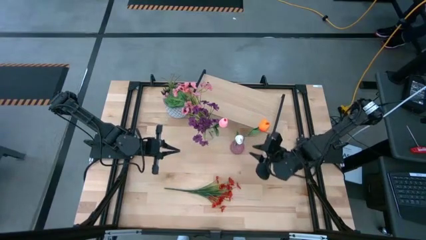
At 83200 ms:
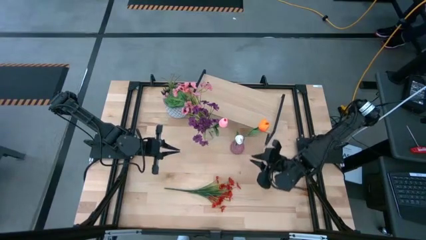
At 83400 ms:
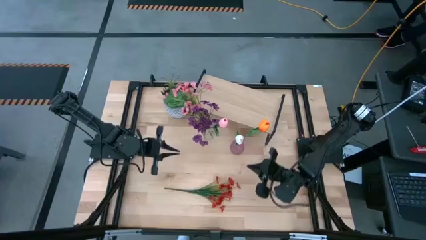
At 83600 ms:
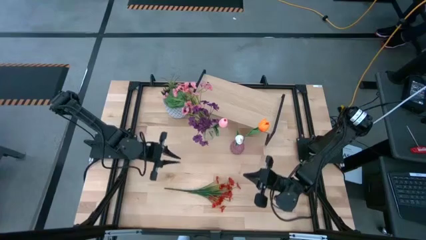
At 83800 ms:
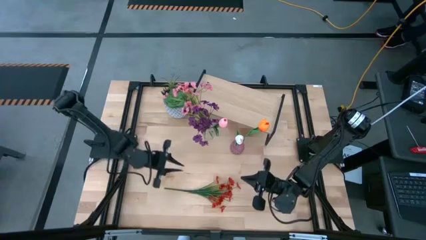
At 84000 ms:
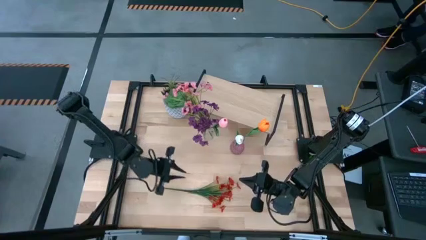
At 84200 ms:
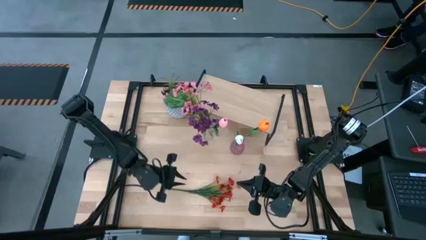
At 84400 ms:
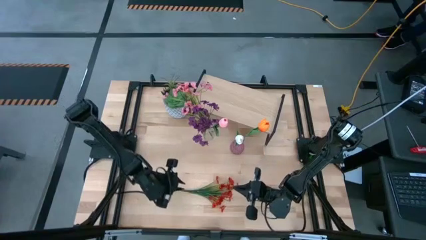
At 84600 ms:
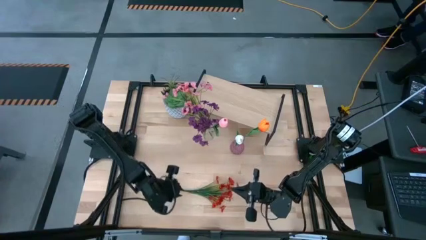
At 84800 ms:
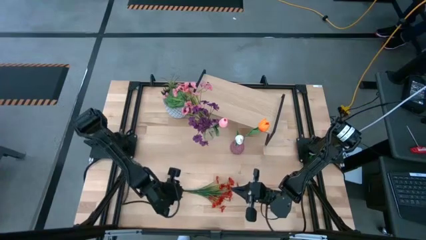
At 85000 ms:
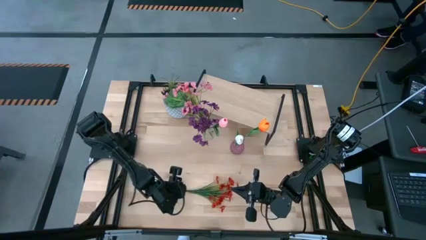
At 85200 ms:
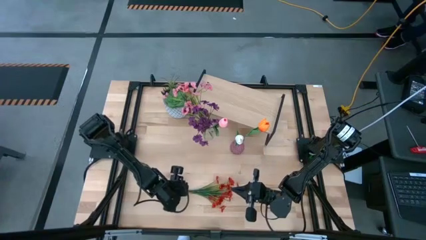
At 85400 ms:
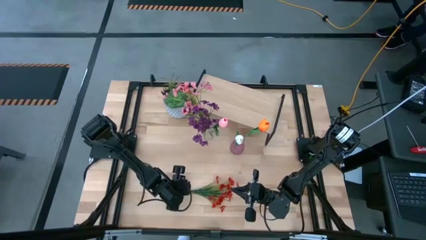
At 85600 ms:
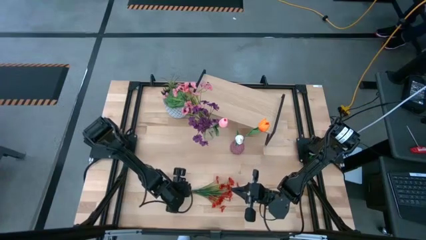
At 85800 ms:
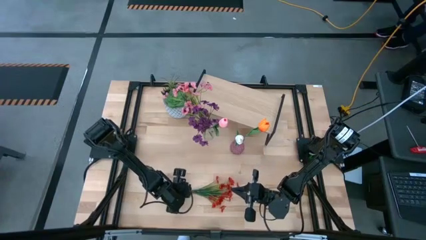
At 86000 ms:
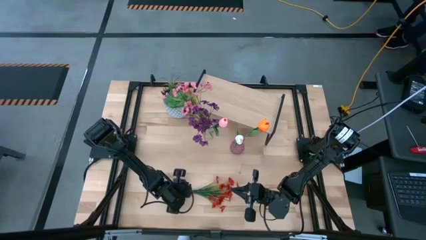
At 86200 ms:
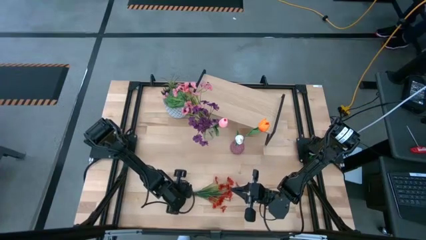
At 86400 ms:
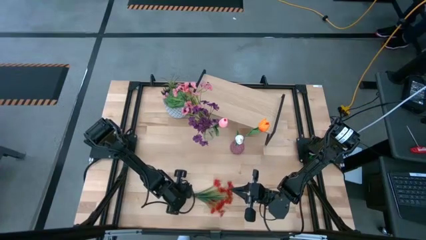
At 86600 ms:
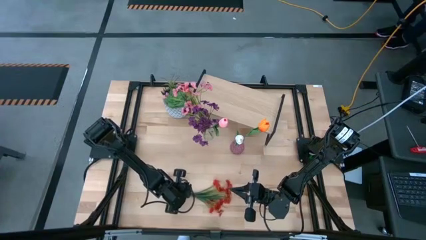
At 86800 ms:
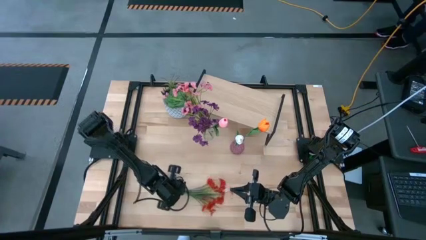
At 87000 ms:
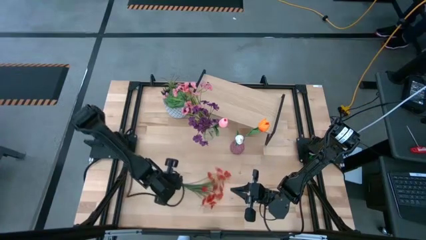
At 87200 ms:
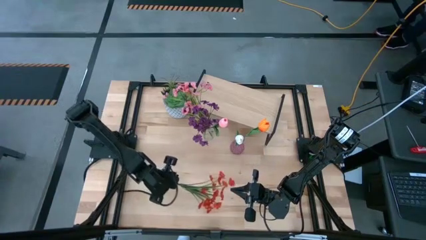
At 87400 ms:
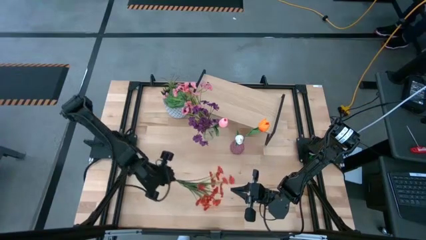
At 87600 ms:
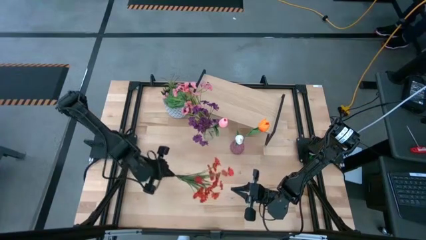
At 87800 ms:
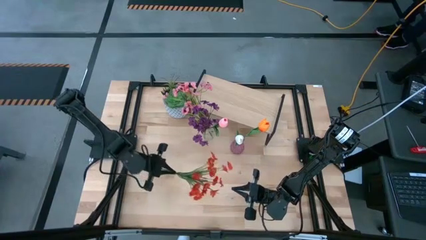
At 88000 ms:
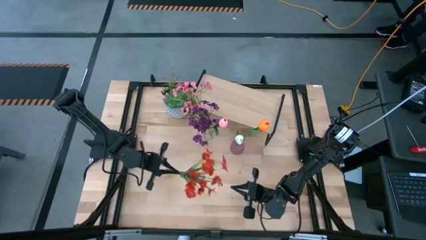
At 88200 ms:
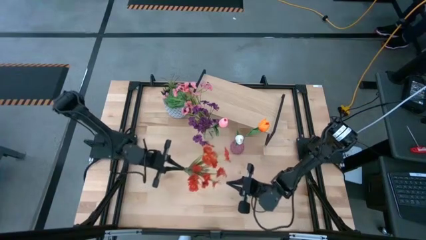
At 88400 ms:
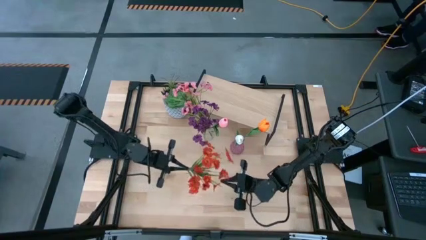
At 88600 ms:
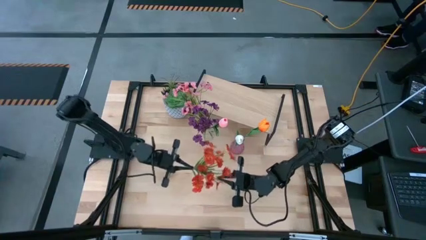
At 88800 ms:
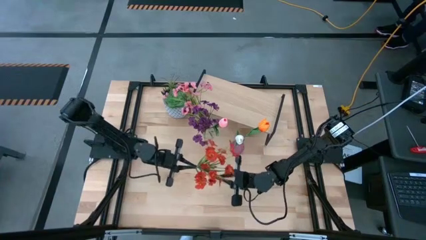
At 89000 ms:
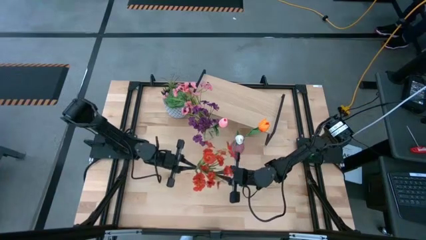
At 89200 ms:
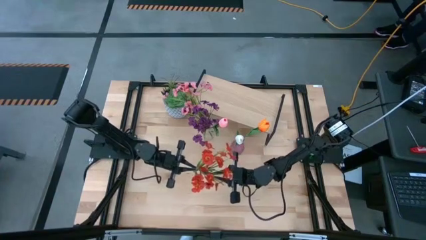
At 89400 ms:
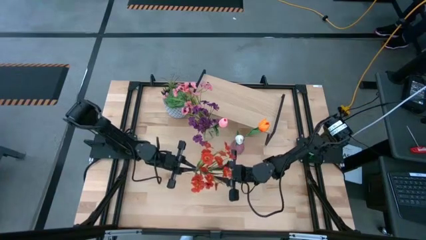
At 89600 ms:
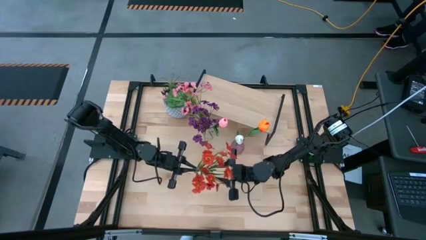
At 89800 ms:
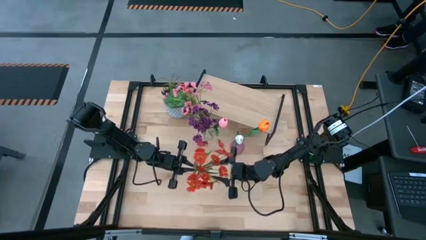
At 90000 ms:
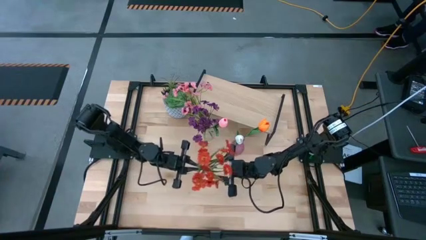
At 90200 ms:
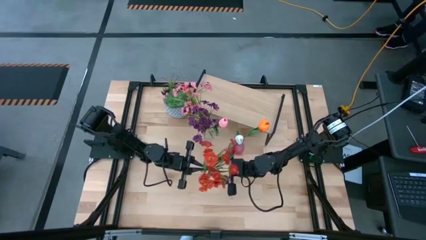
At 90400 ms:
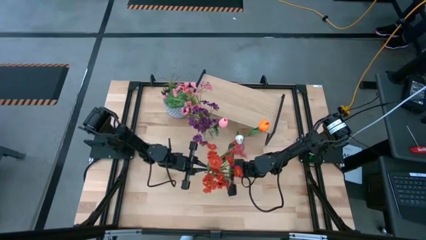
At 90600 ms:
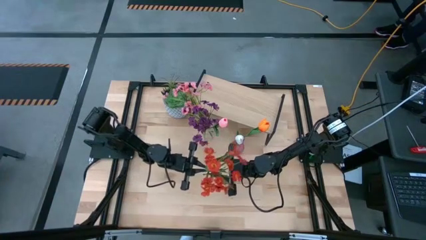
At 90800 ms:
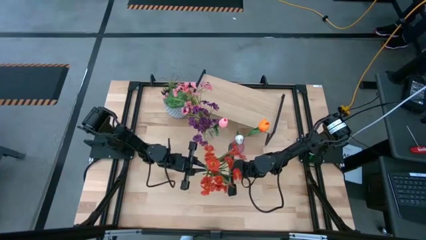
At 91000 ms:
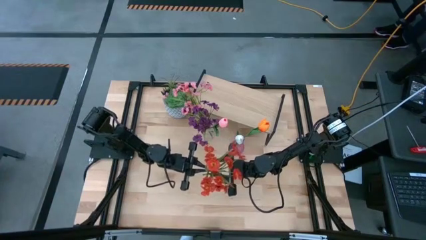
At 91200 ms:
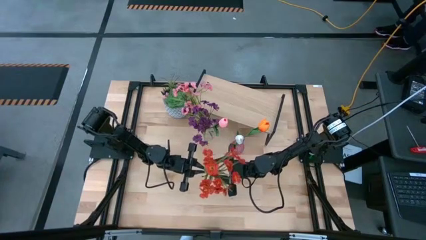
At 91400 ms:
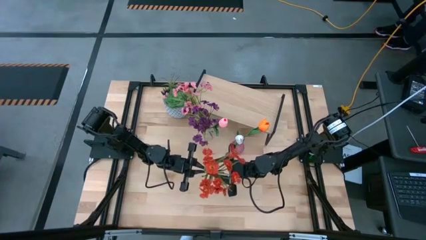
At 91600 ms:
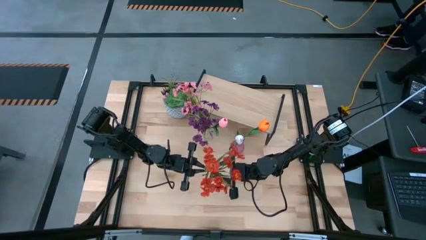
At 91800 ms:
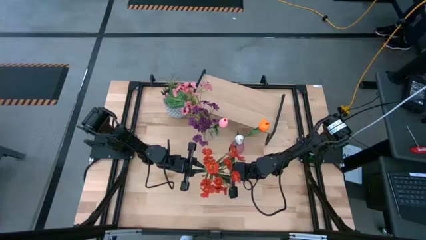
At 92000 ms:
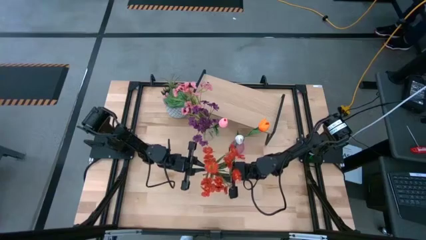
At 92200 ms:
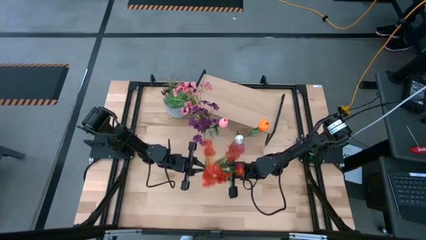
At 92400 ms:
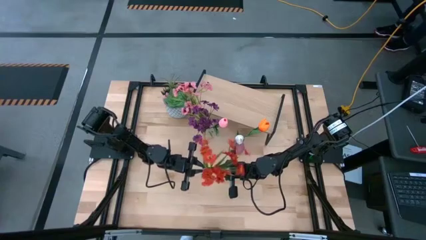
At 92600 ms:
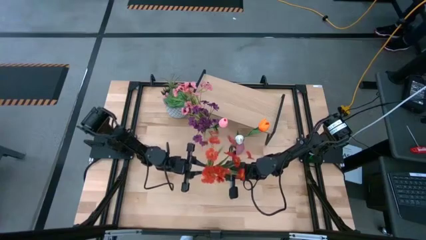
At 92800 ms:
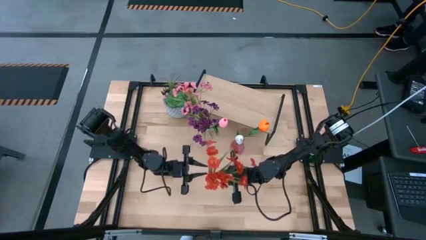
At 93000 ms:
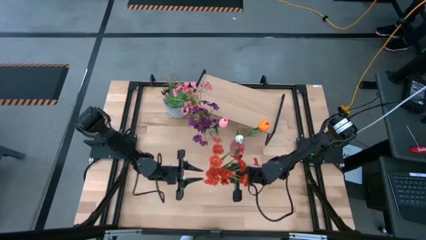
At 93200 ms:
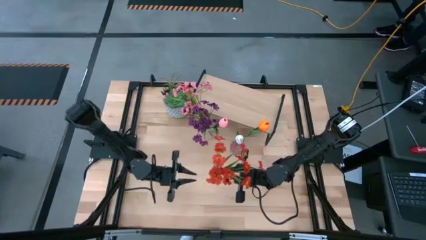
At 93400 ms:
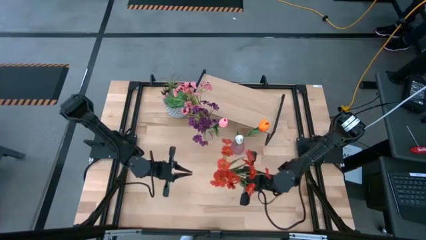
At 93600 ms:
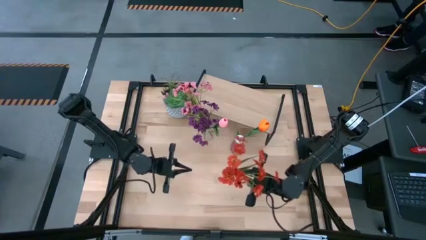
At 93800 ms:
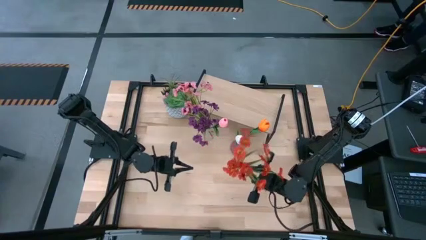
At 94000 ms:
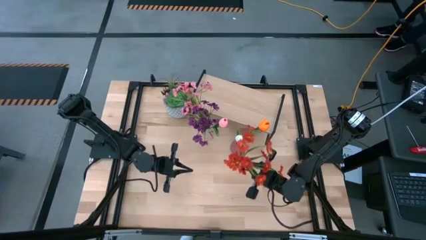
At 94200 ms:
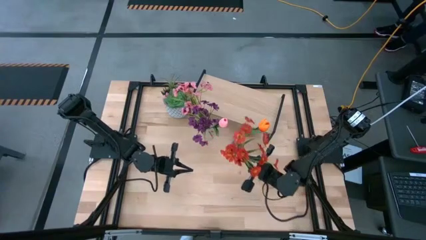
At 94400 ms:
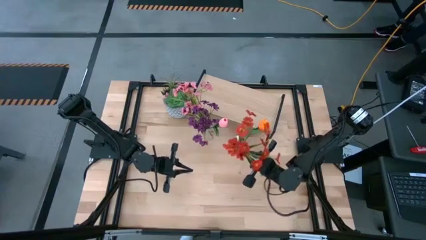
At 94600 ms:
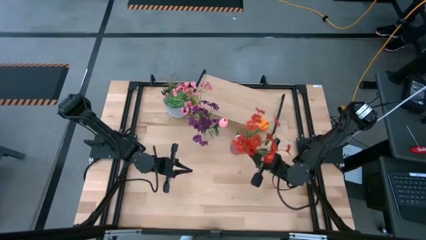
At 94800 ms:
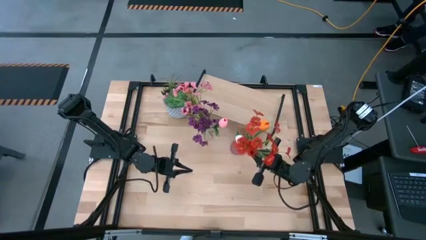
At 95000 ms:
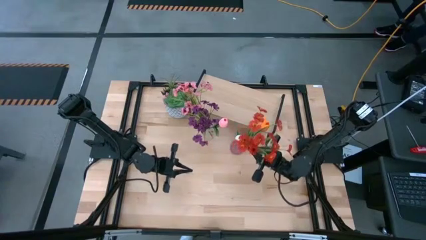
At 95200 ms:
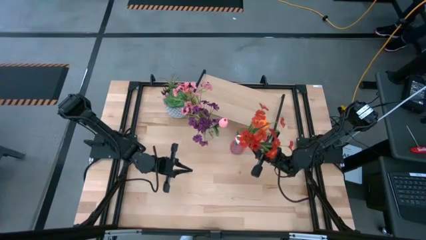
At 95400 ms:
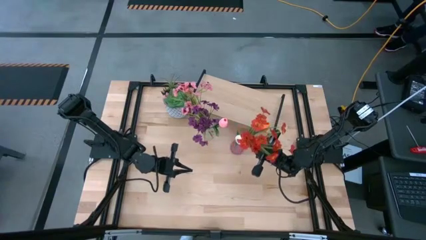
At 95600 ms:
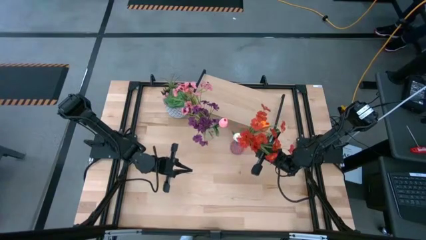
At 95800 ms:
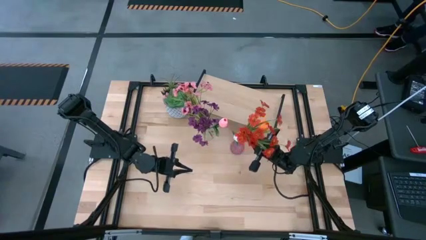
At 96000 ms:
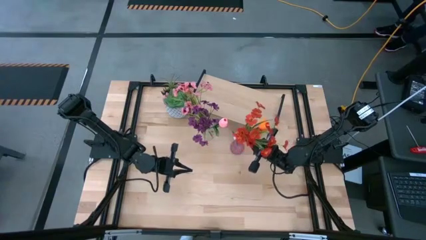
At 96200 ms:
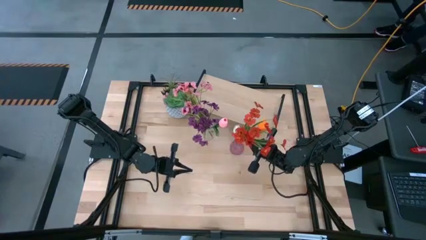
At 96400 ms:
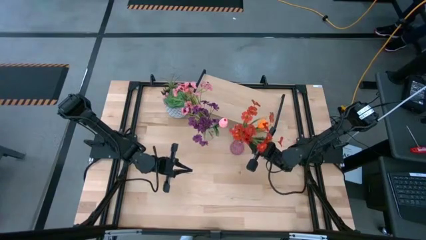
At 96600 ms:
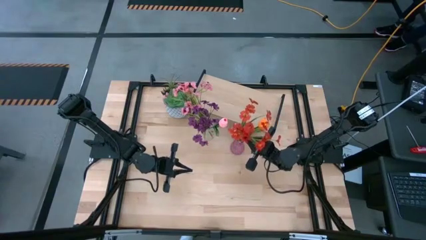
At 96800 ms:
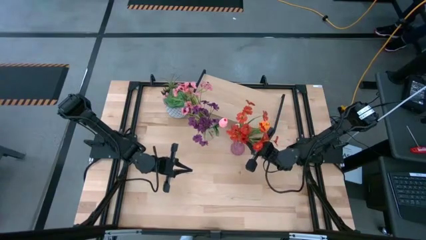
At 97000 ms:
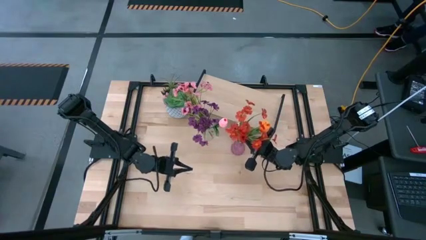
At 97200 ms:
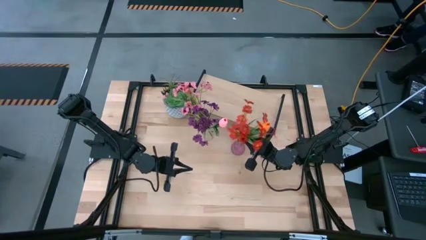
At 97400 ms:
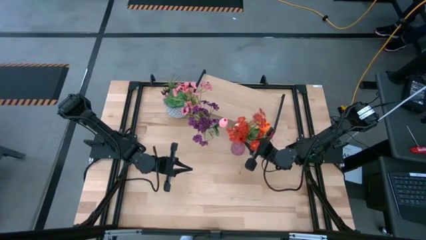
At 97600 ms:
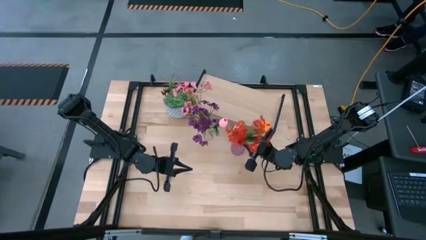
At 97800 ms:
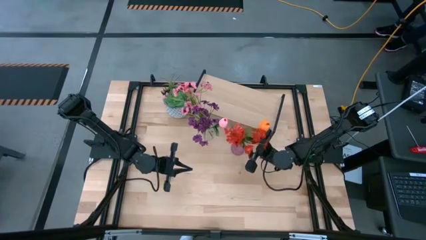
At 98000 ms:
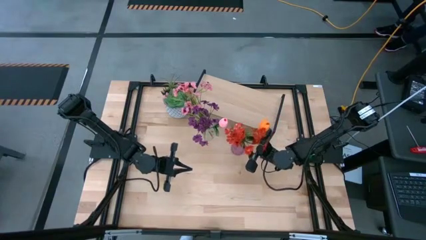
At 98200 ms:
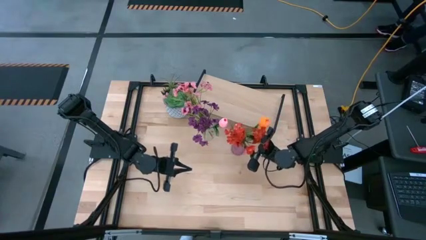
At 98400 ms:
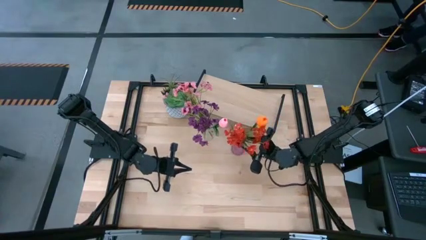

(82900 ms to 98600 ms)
Task: Pick and place flowers into a vace then onto a shelf
Put the orange flowers into the purple vase
